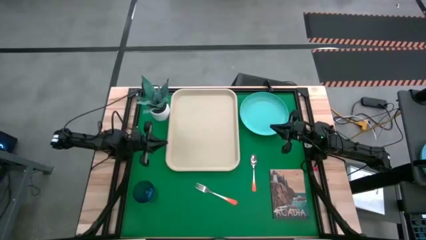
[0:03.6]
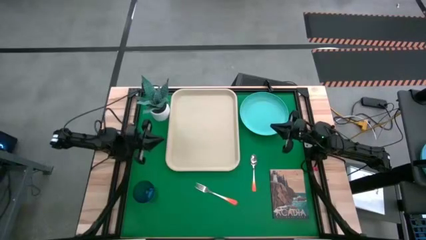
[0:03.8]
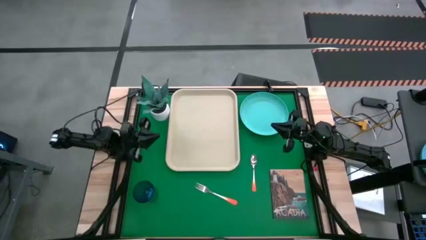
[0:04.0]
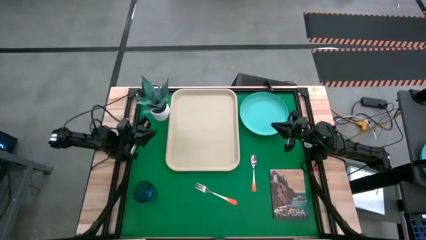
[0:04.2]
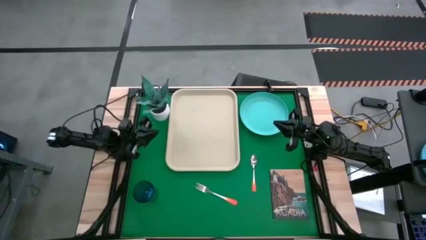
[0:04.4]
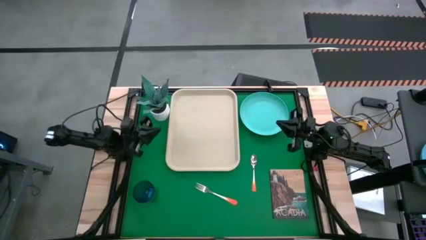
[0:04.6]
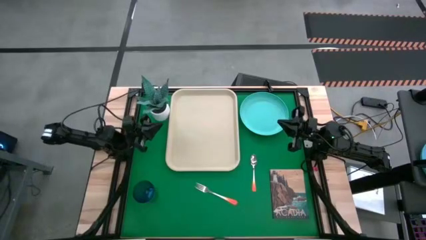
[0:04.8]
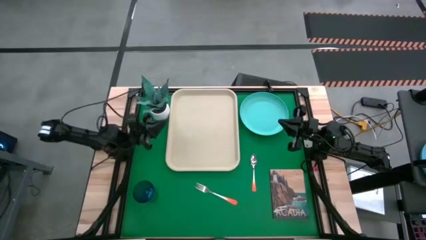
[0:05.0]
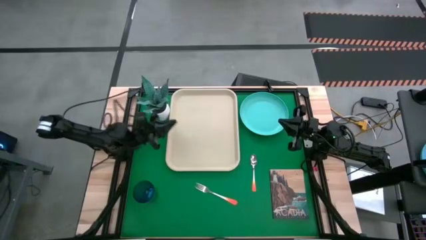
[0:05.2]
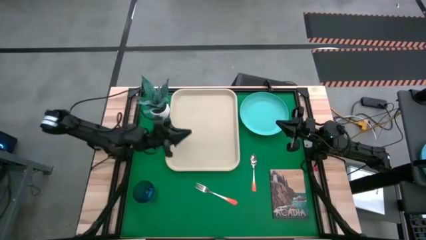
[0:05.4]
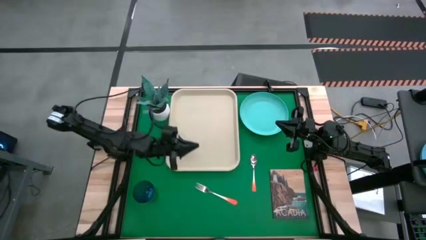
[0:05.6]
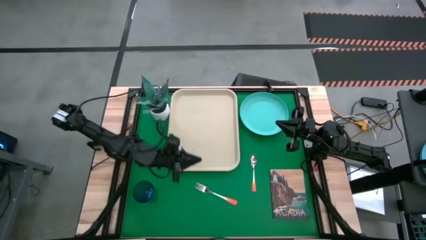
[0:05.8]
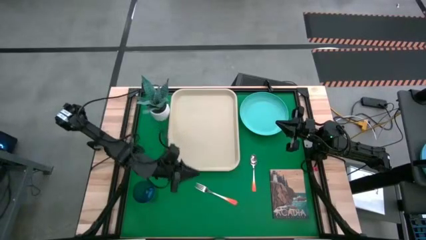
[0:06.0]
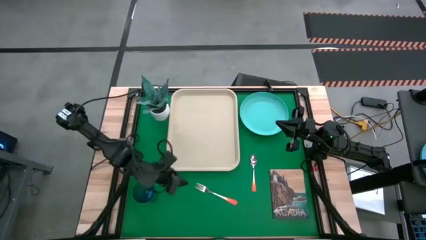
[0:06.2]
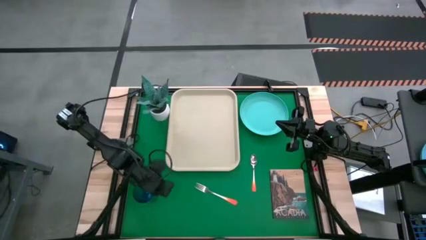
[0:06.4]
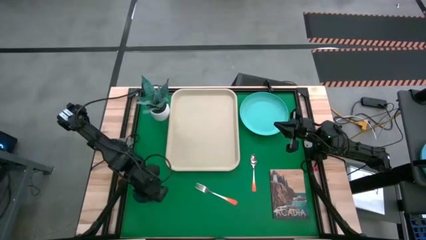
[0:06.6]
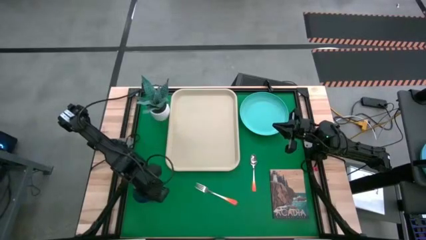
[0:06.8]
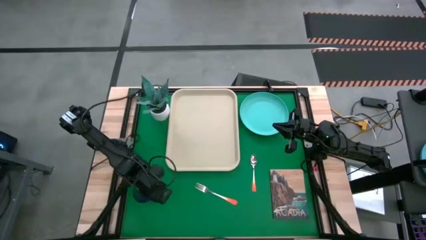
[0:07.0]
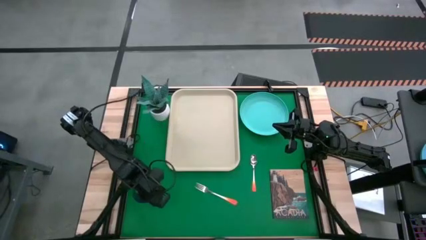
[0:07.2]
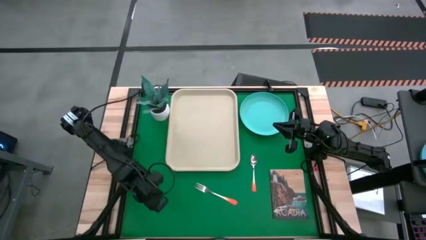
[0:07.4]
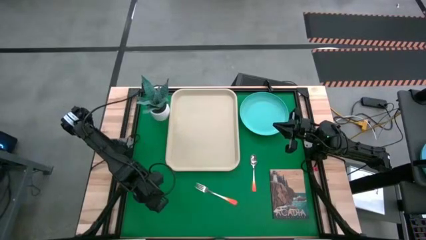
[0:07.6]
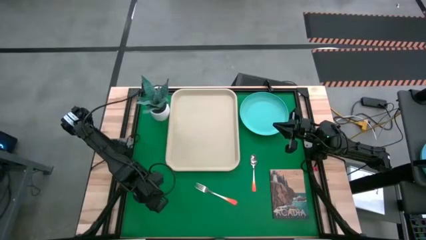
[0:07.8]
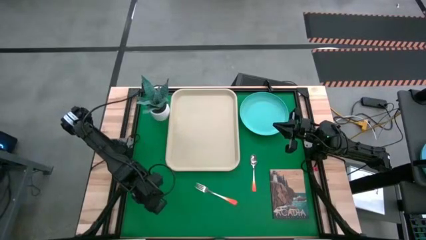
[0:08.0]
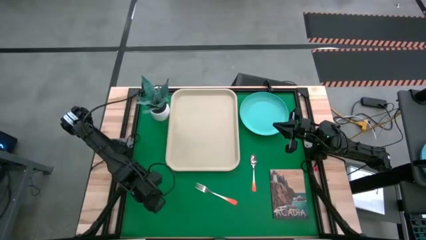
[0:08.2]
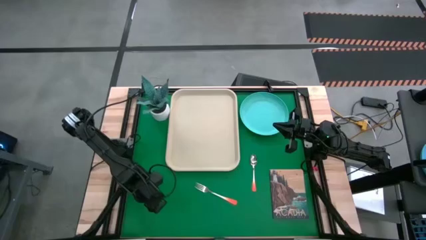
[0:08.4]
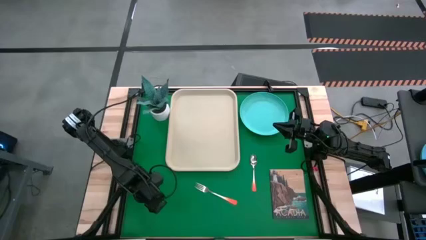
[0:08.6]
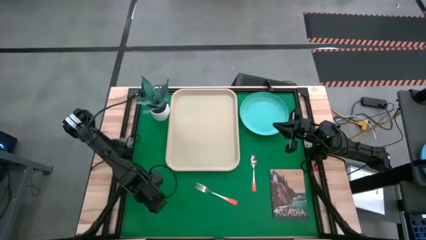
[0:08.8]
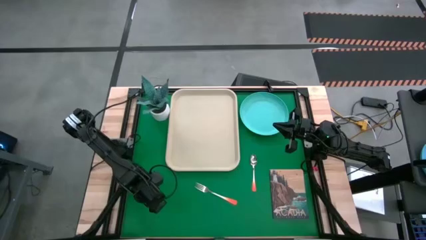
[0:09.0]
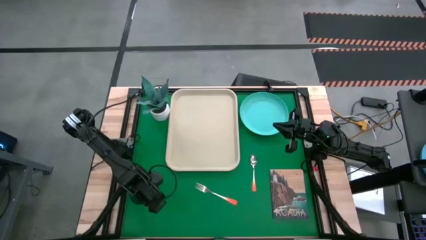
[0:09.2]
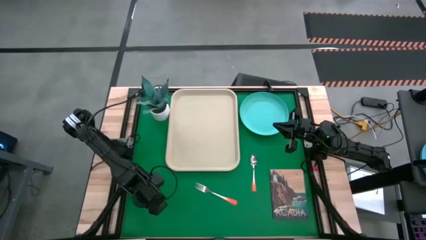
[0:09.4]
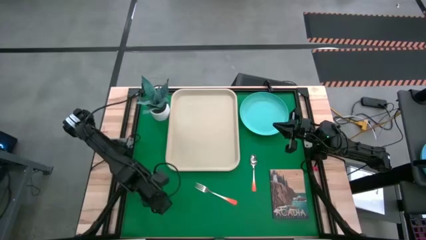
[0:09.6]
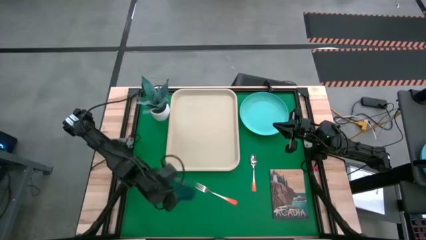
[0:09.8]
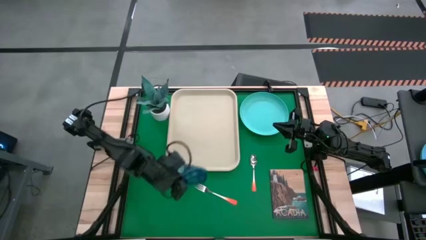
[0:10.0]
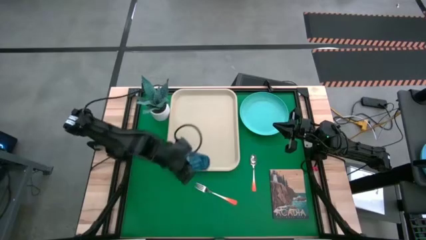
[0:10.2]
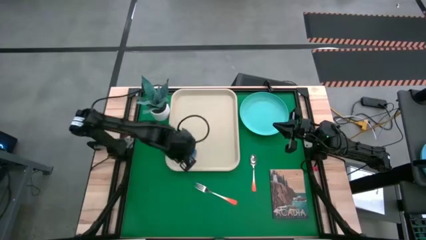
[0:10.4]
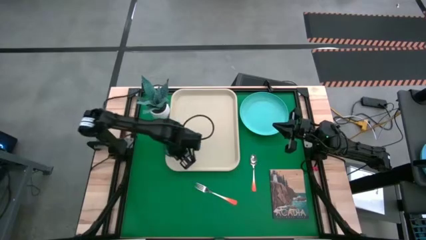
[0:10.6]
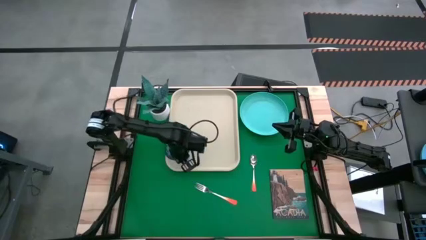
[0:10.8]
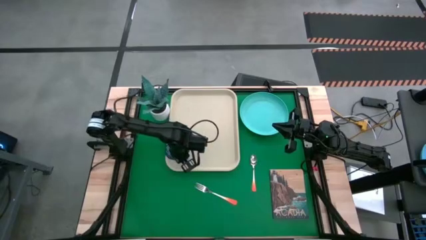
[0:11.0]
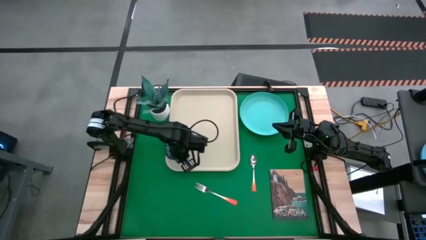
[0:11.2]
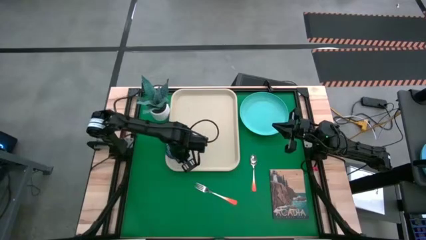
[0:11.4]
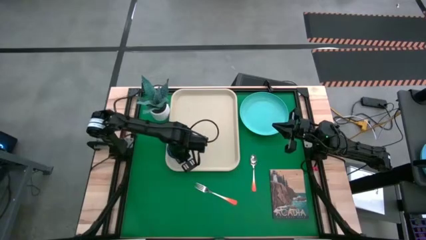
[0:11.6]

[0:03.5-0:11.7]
Task: Pick and place plate/cup/fork/spoon on tray
Put the blue glass on the serving tray

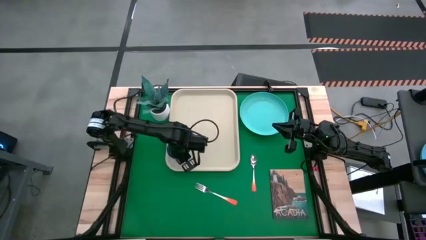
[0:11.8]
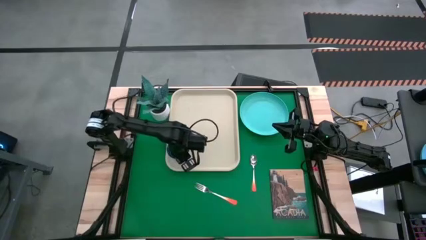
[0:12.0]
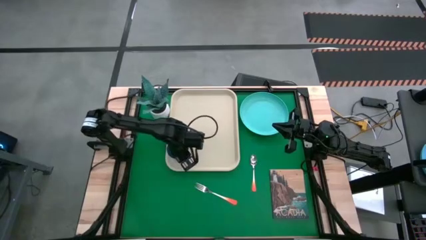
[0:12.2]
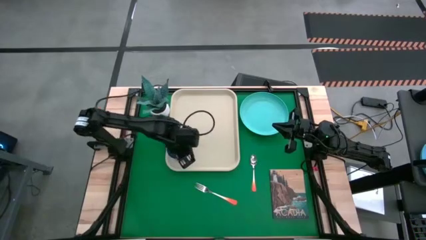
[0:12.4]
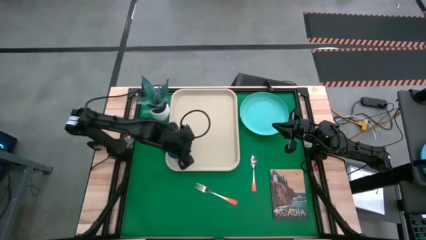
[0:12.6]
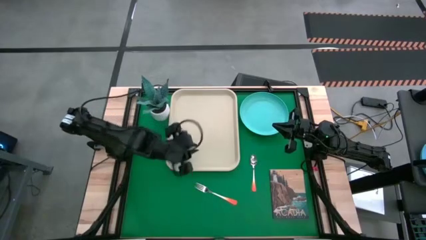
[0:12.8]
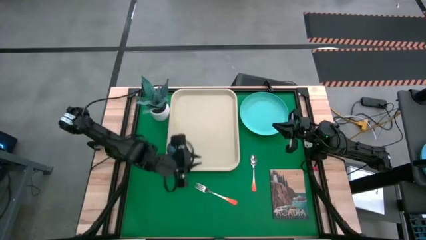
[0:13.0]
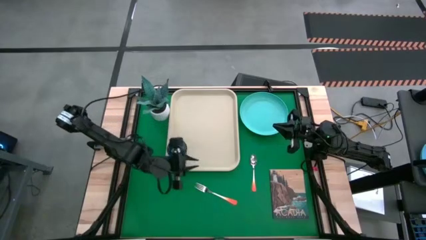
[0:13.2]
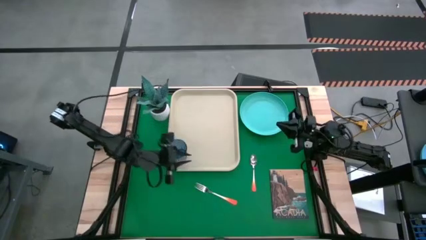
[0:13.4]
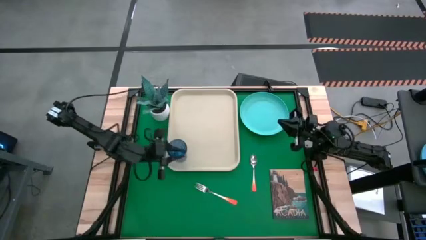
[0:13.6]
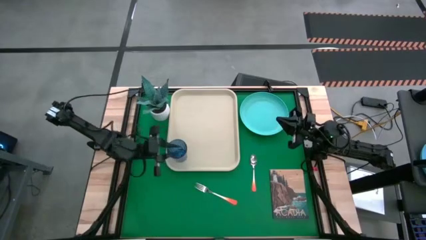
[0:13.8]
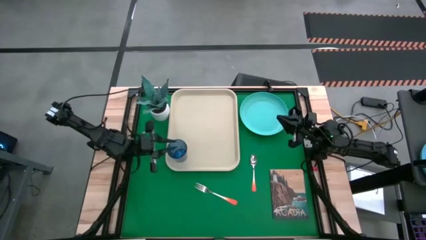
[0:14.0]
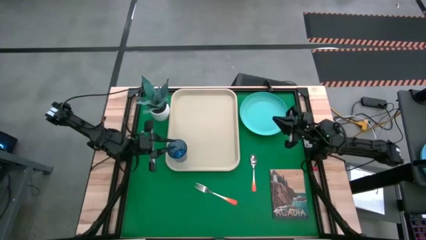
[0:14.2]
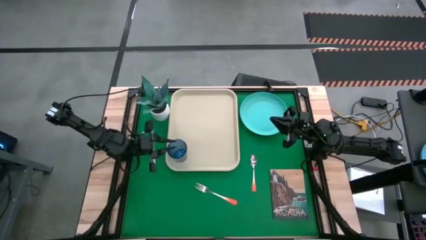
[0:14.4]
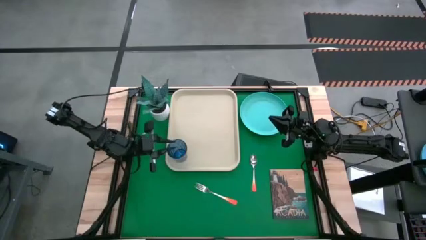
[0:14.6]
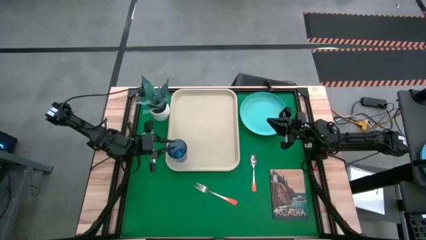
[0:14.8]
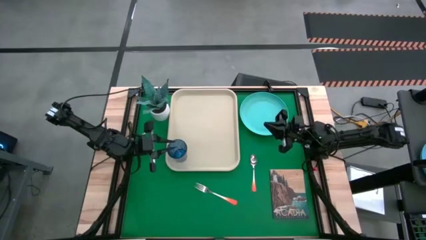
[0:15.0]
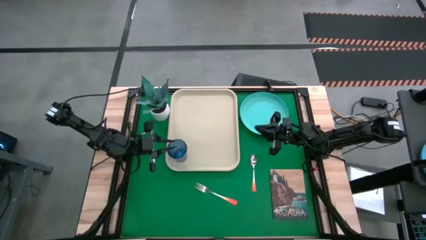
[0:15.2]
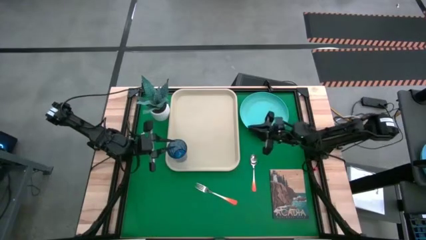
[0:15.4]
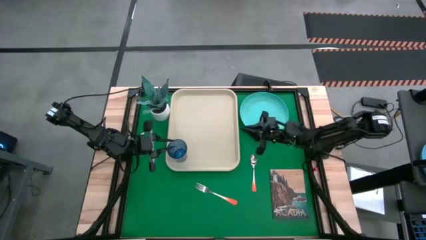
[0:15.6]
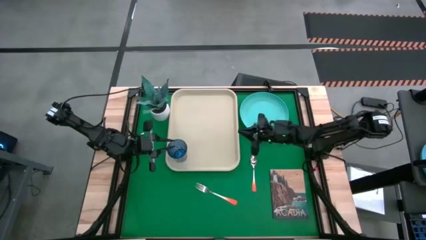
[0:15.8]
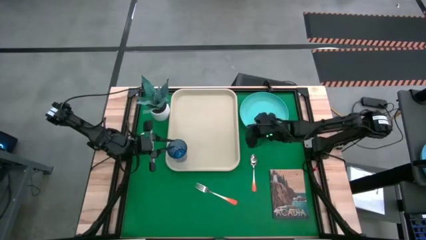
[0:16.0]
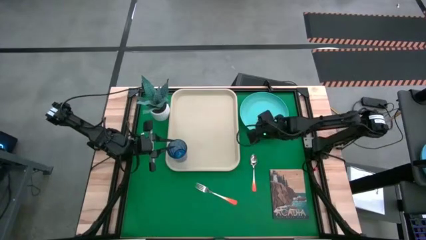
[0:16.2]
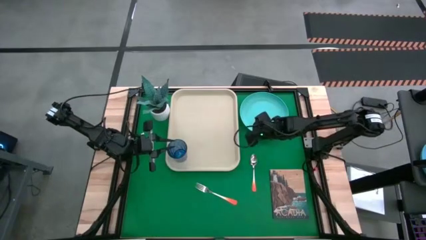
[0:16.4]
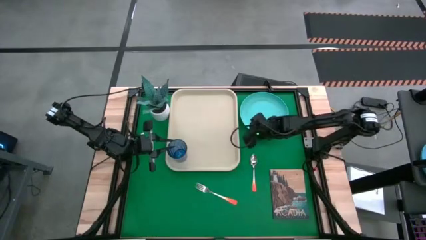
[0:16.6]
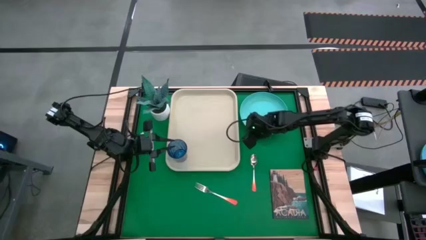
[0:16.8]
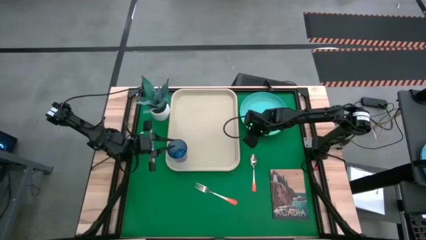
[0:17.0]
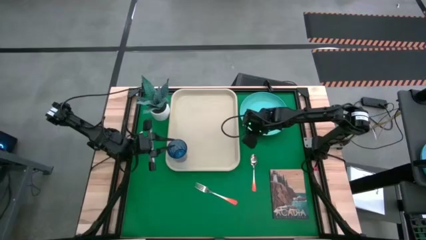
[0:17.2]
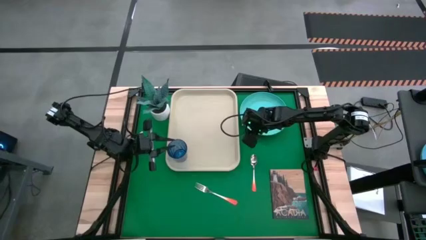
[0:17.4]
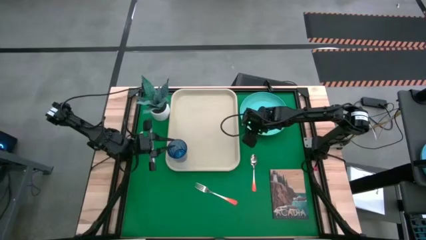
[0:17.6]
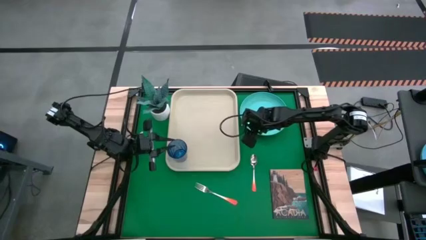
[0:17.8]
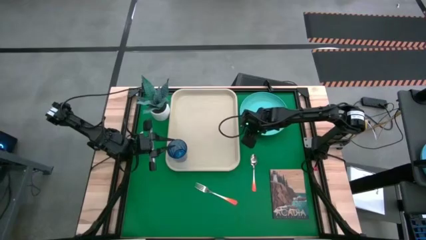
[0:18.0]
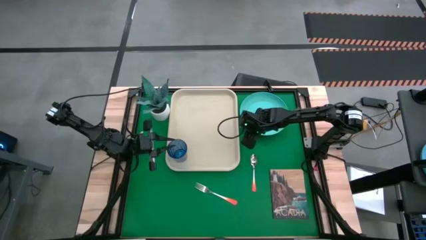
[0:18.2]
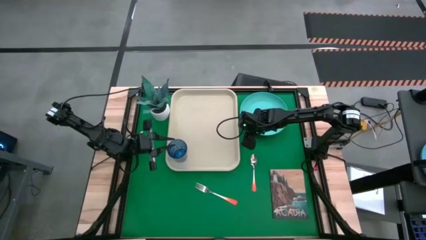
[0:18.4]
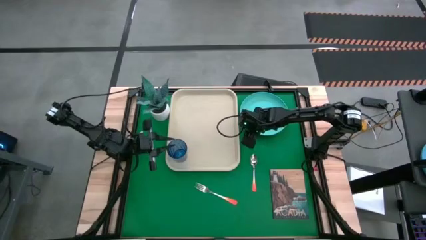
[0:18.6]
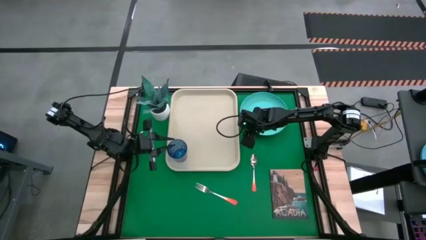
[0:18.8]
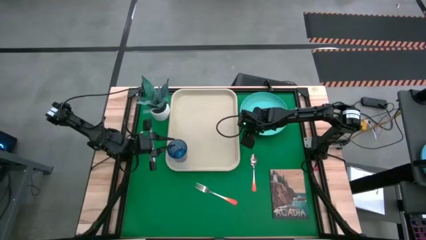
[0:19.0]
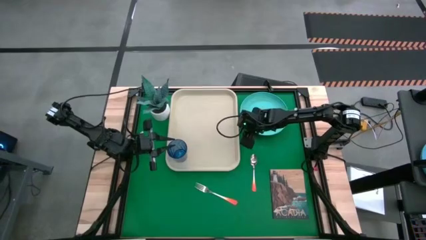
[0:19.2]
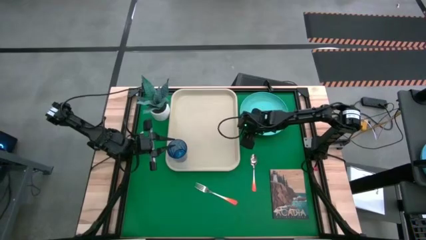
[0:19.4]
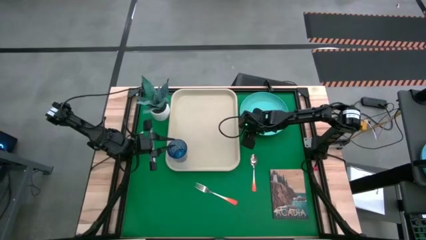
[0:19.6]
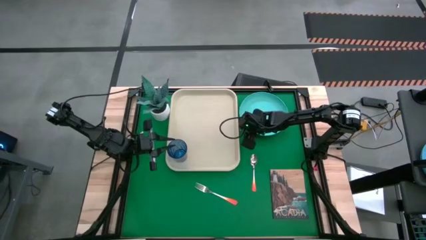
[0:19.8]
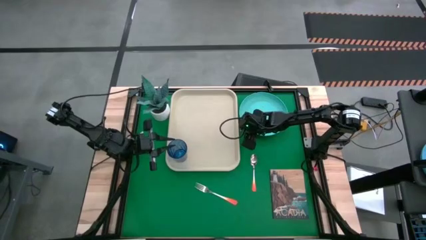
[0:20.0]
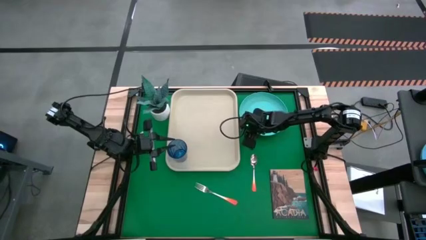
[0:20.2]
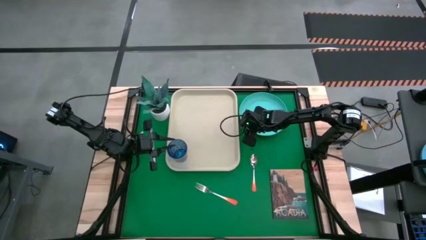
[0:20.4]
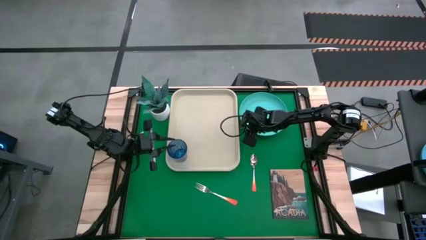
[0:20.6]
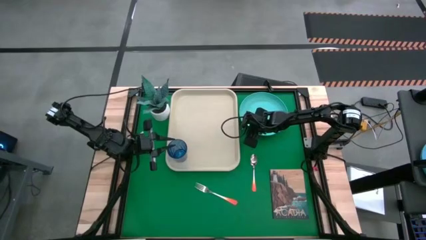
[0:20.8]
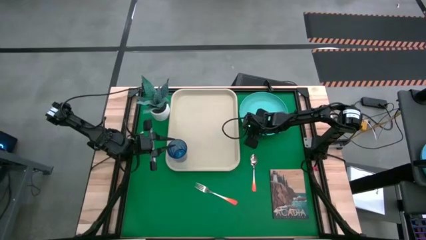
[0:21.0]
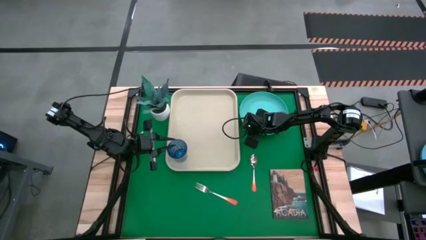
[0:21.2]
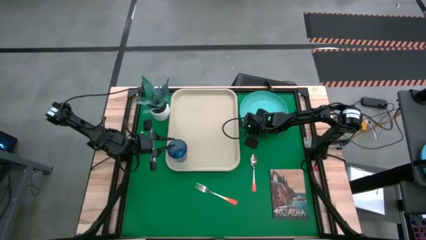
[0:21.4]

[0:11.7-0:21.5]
Put the blue plate on the serving tray to the right of the blue glass
